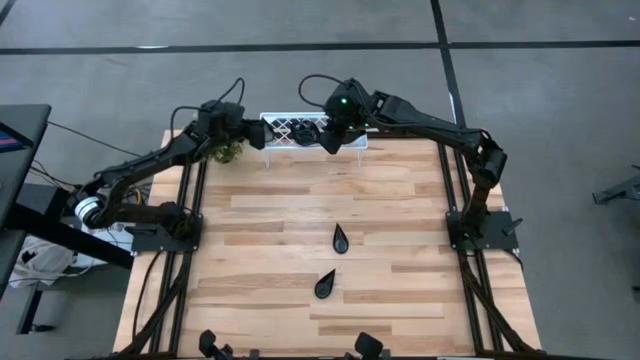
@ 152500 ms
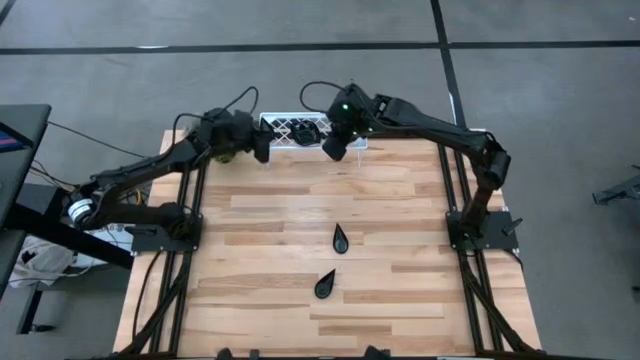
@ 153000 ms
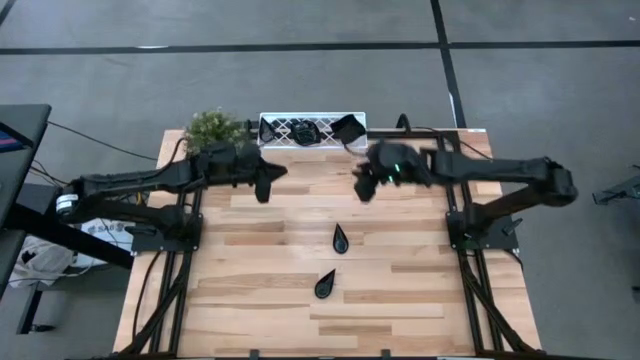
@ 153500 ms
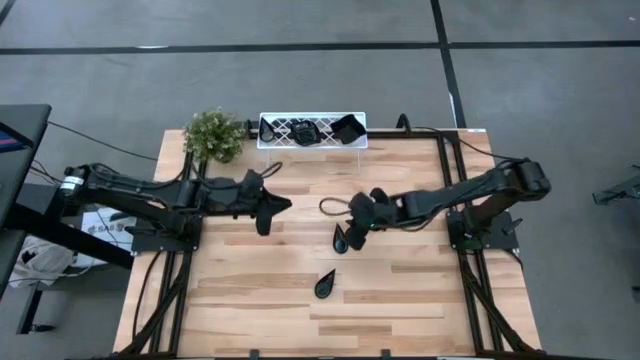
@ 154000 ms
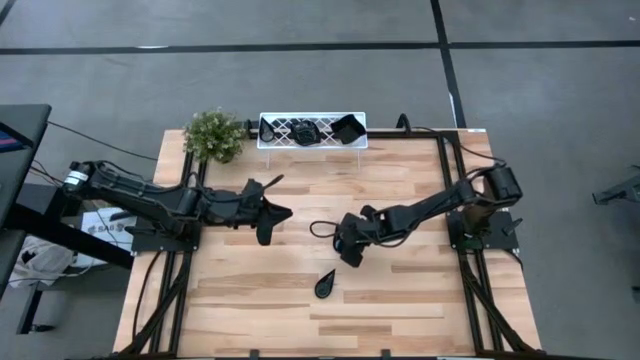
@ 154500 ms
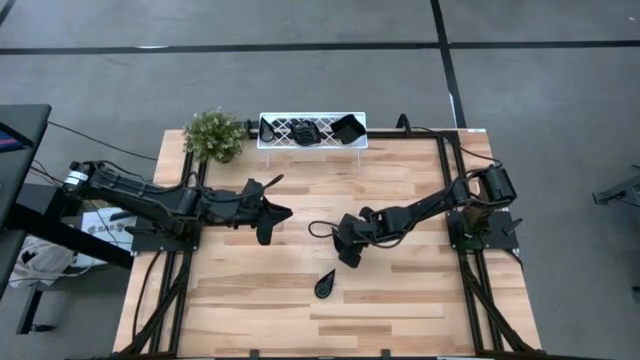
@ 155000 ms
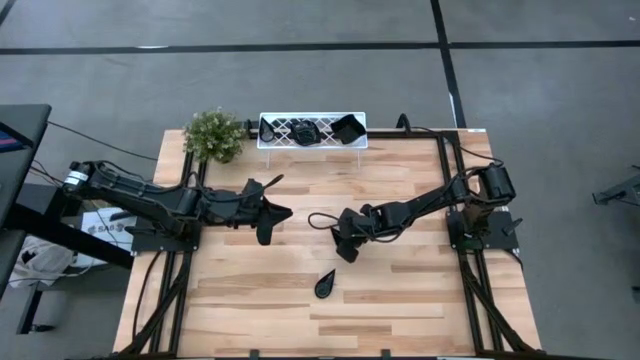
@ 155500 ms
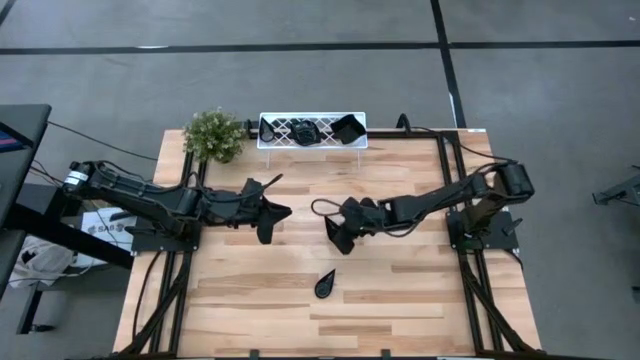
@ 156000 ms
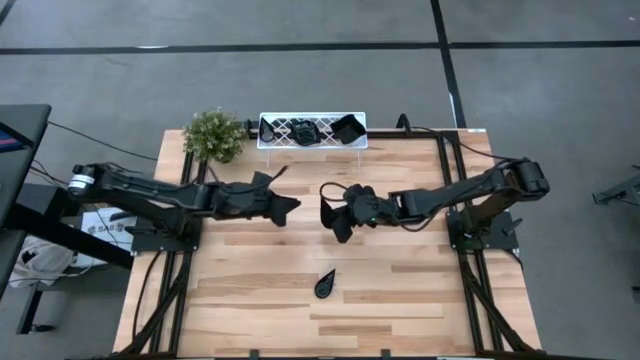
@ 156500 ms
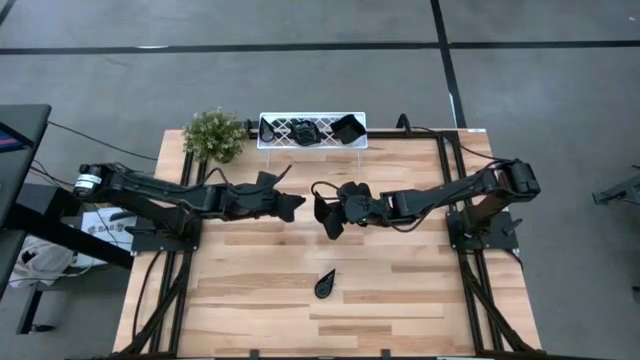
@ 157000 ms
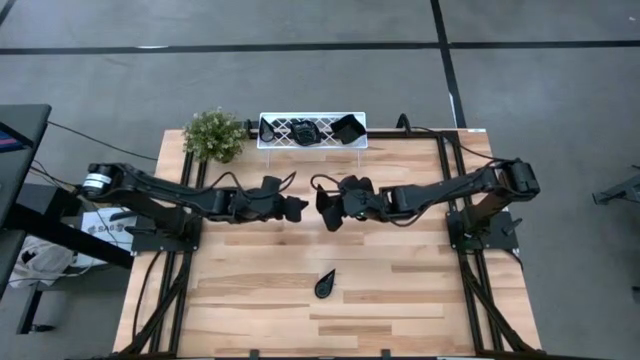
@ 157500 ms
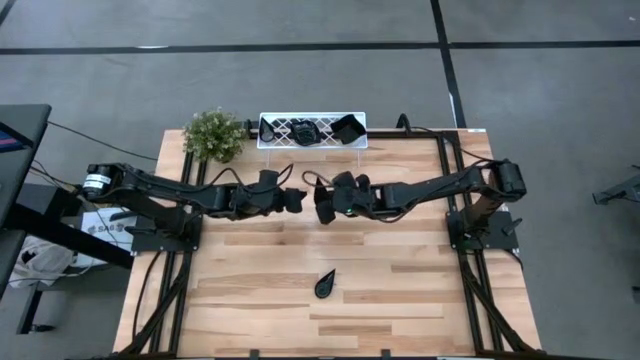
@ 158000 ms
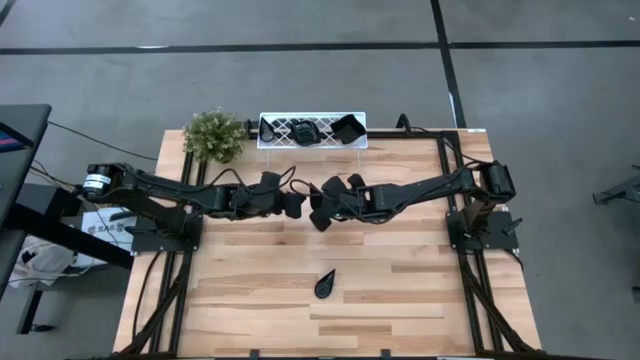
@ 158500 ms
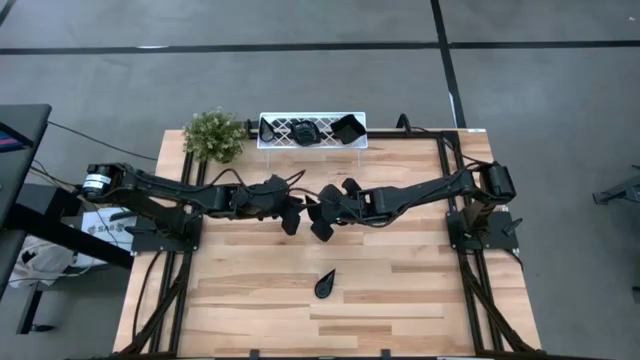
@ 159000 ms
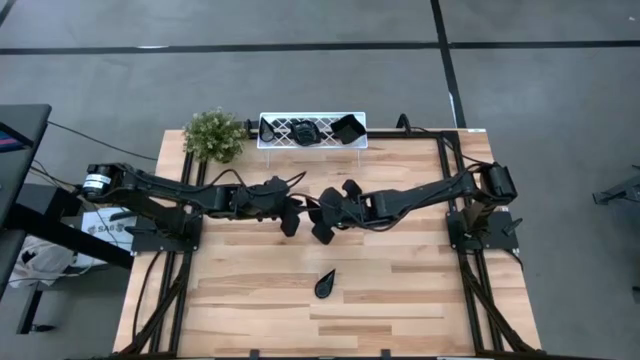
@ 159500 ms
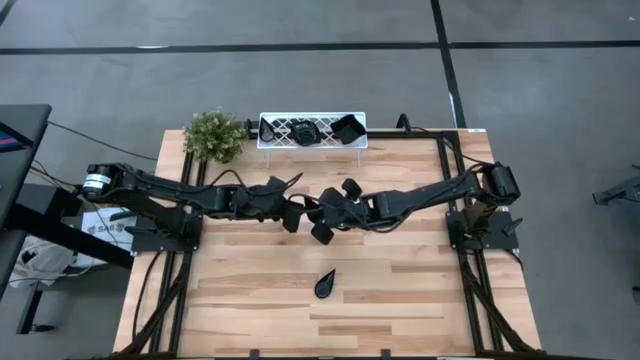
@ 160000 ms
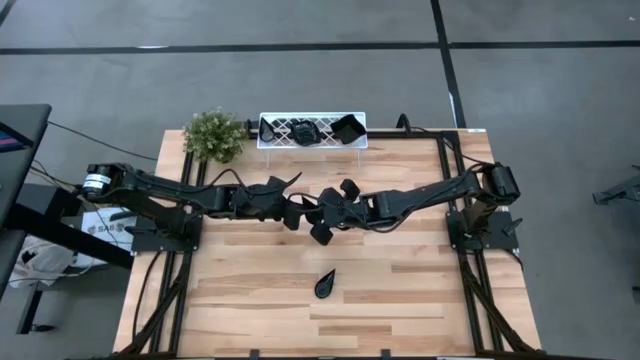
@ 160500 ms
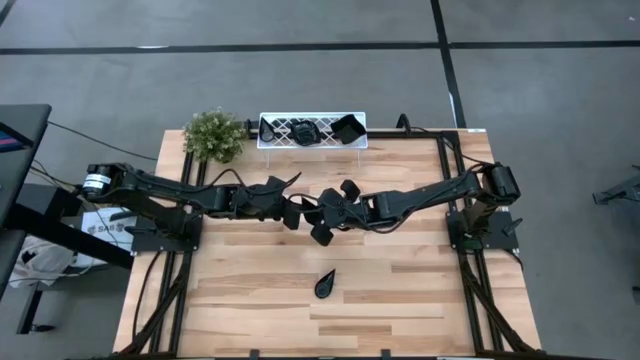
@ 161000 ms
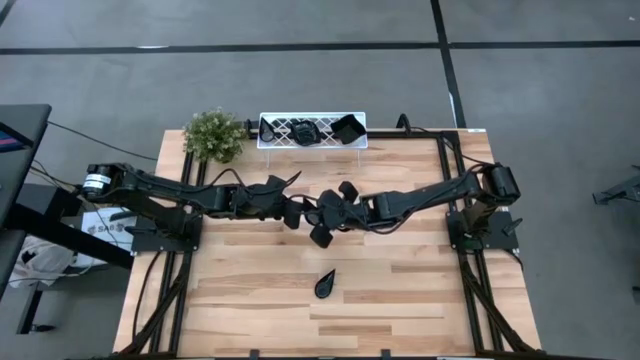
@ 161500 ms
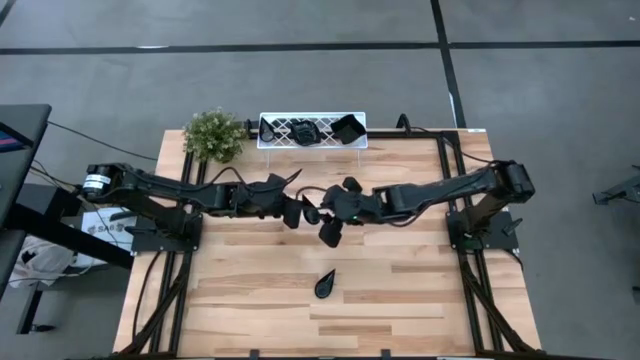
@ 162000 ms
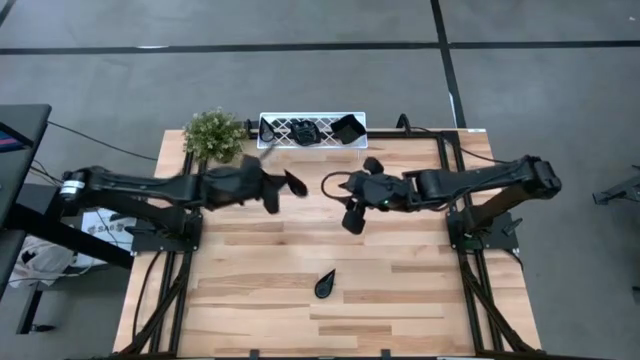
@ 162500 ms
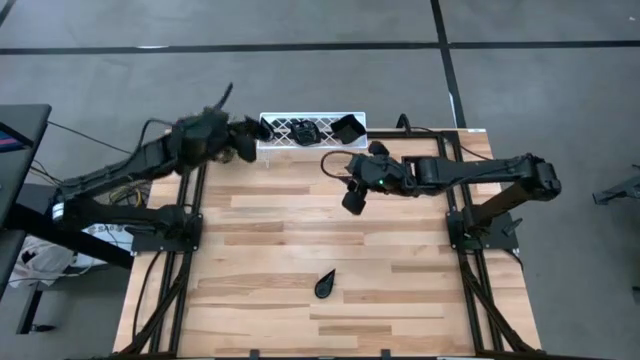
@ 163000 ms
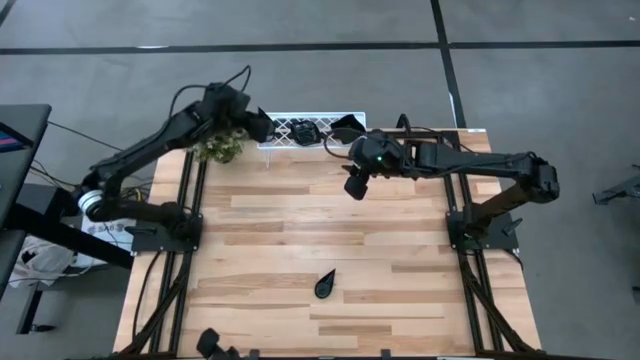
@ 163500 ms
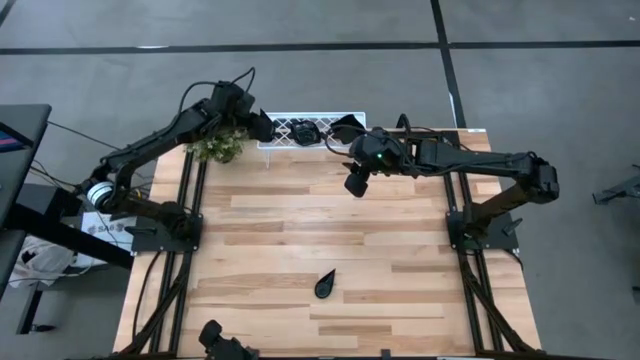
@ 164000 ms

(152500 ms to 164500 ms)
Task: Pick & Place Mini shaped plates
Stack the top drop shaped plate on the top of the drop shaped plates on the shelf

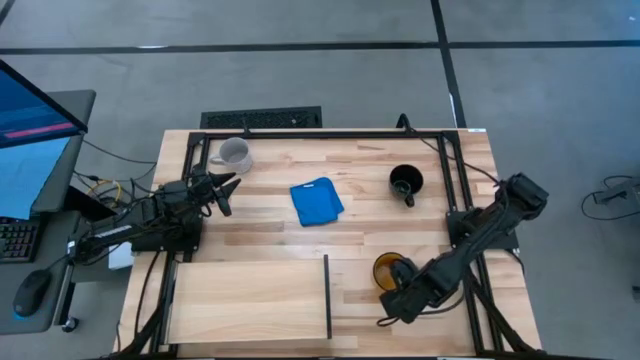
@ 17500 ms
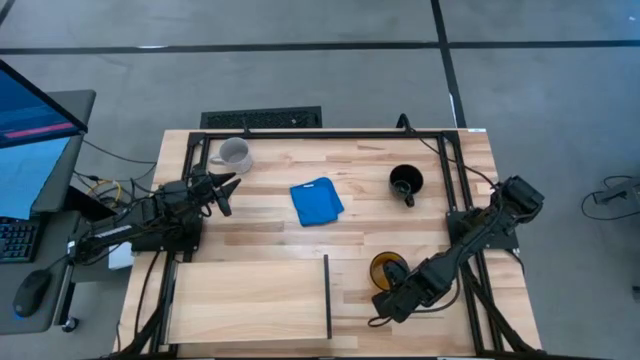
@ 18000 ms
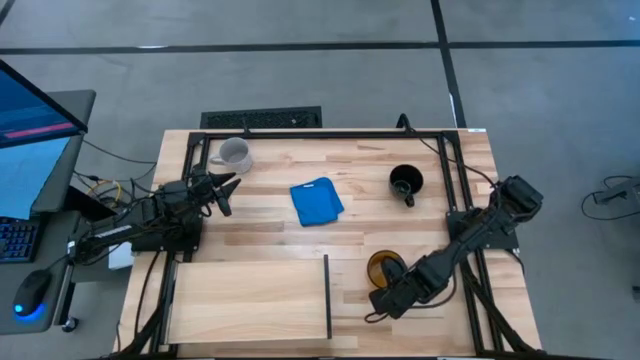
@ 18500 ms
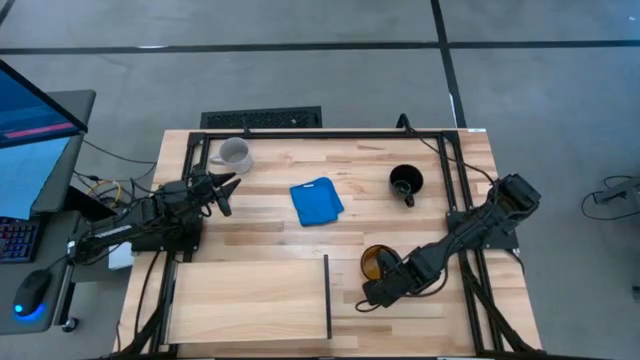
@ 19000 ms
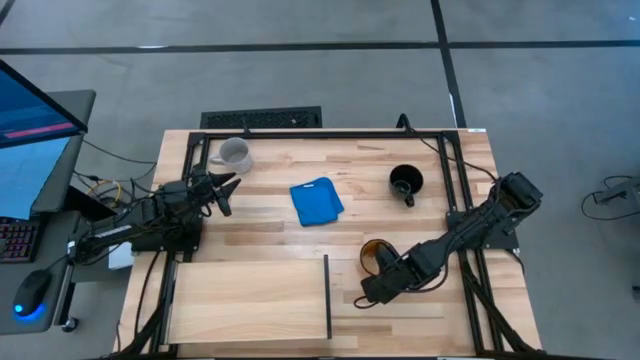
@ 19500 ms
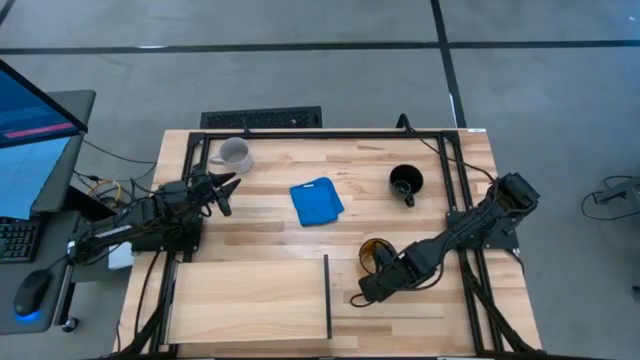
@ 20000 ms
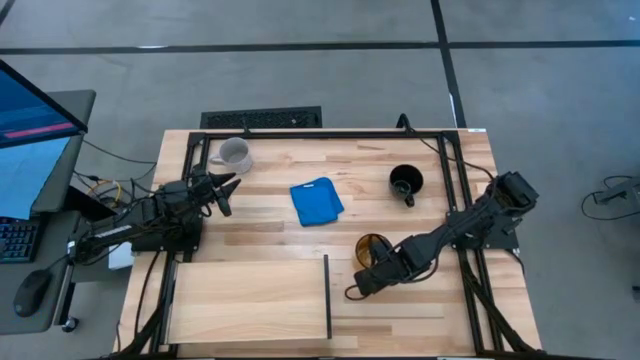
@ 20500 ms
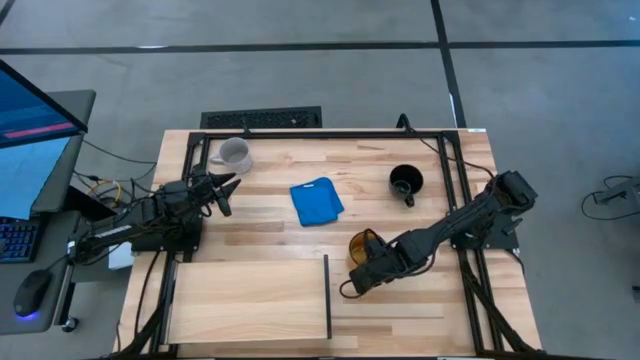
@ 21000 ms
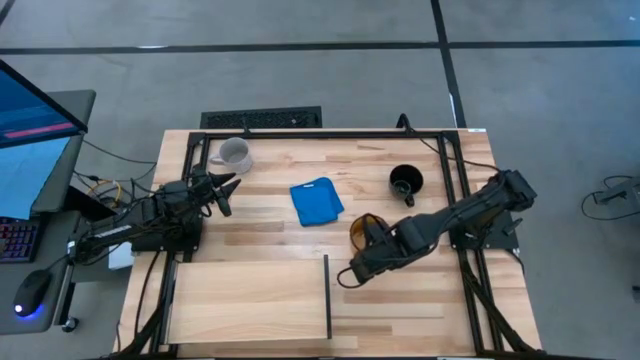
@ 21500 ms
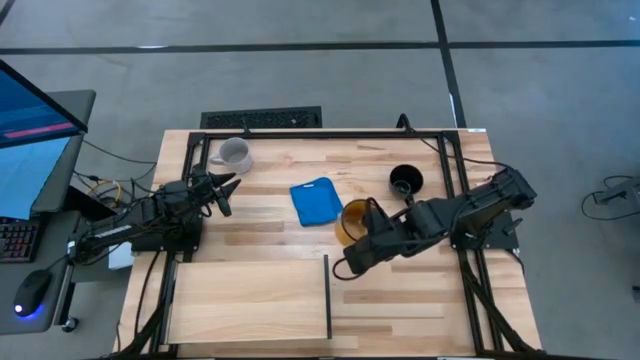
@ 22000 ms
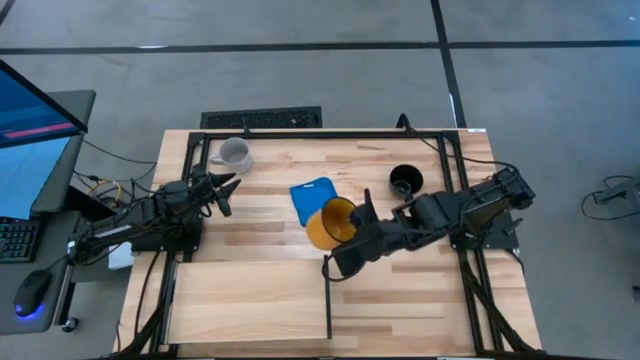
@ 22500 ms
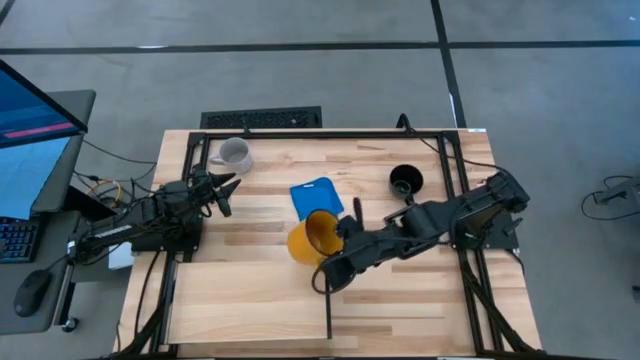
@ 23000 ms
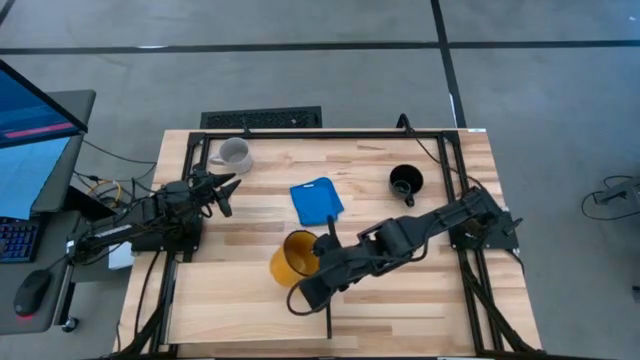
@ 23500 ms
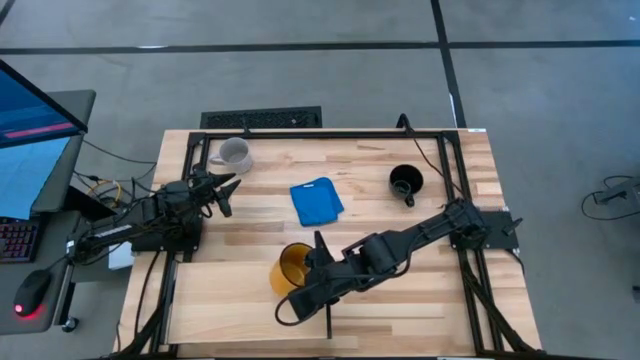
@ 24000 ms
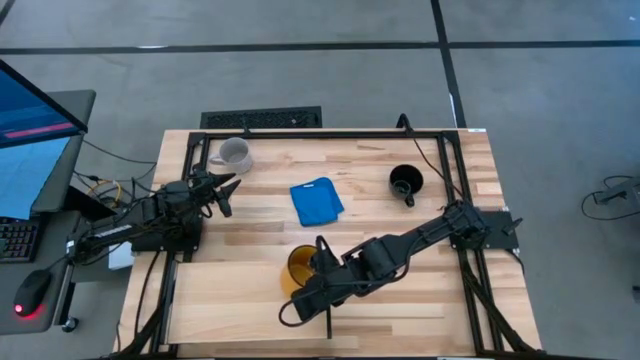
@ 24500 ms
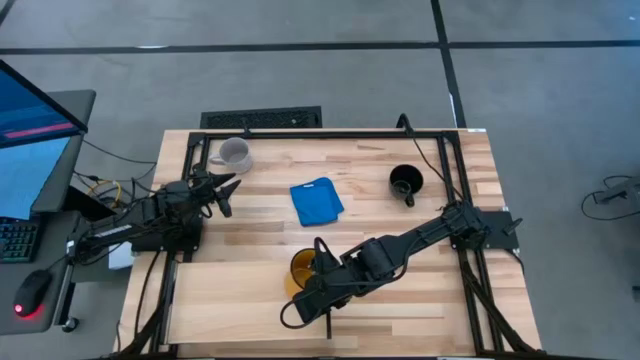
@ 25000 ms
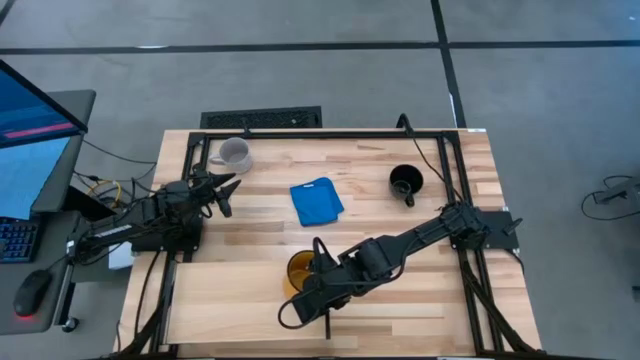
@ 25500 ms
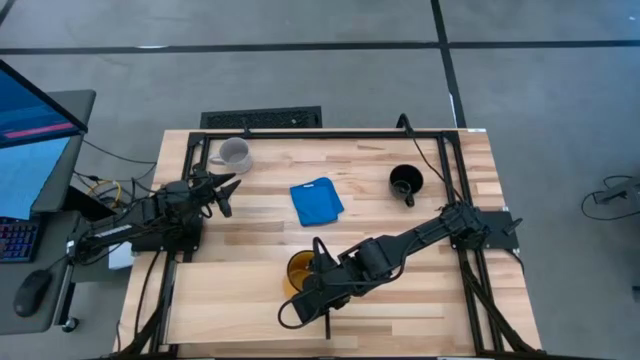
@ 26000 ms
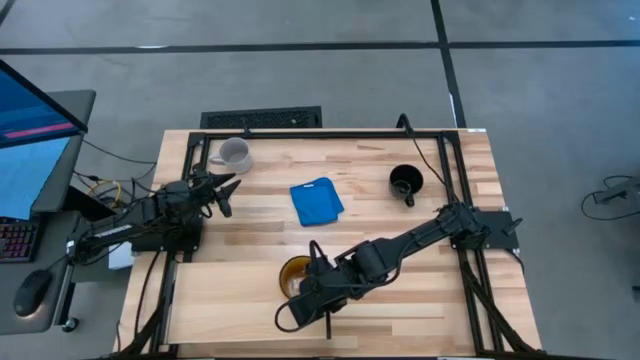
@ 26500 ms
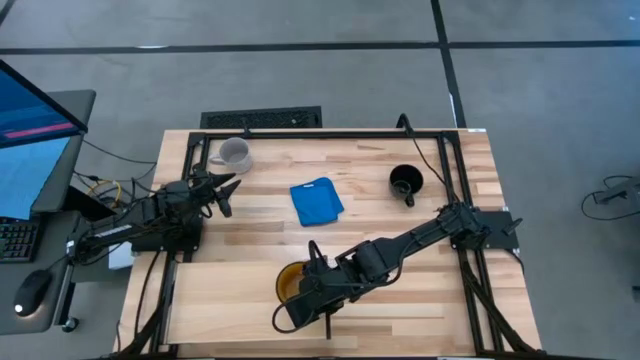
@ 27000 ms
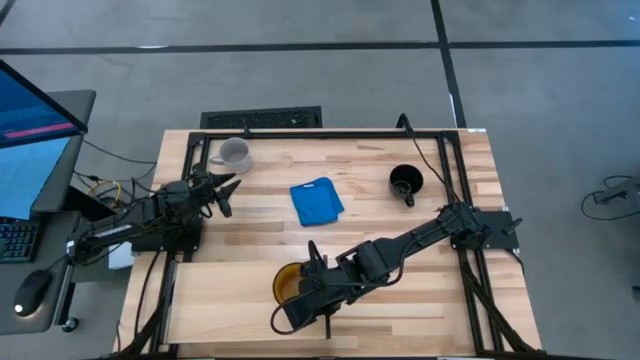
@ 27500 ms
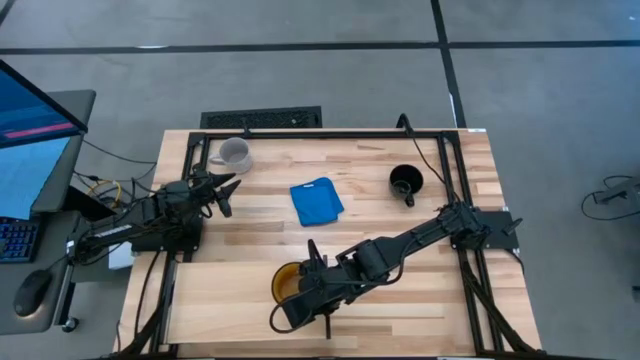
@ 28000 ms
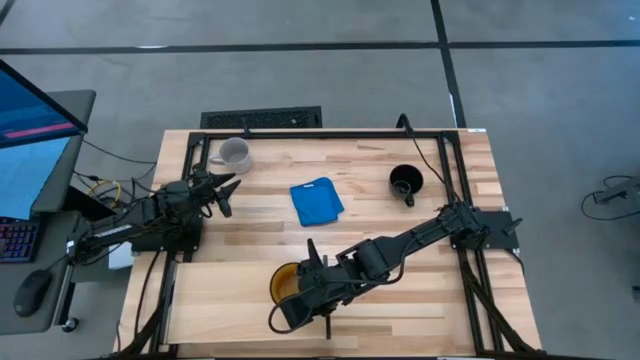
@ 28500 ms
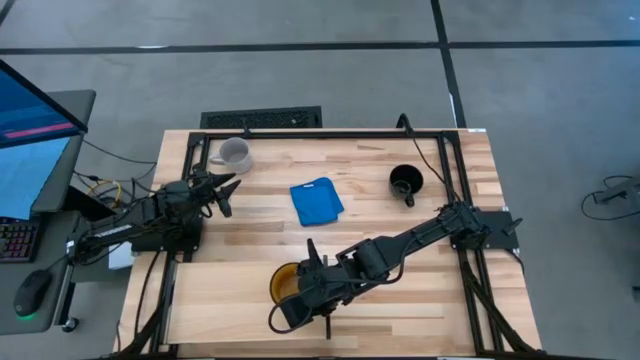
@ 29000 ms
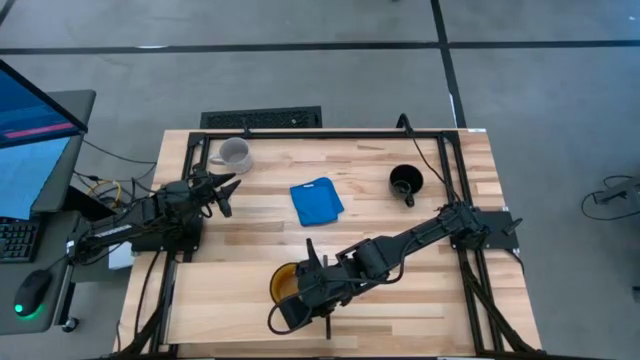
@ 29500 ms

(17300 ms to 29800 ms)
Task: Stack small to large cups/mugs on shelf
Put the yellow mug on the shelf
